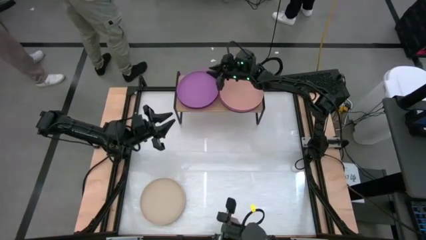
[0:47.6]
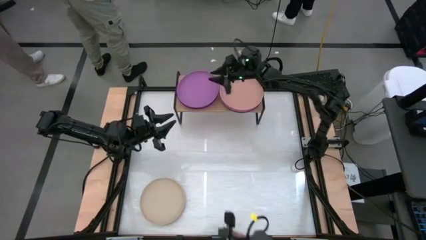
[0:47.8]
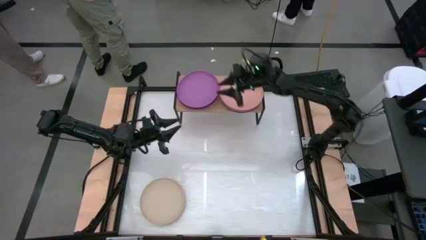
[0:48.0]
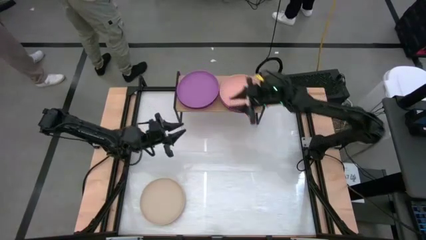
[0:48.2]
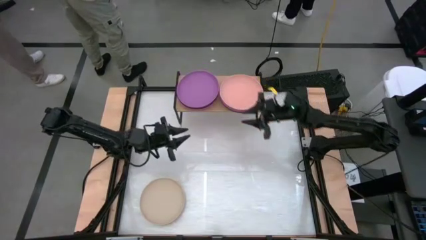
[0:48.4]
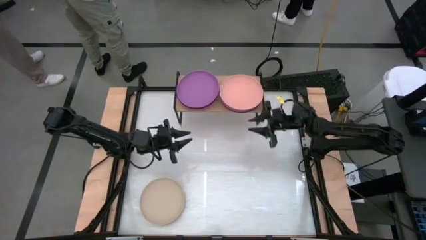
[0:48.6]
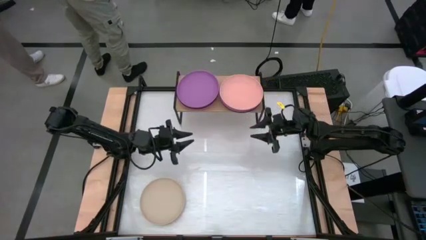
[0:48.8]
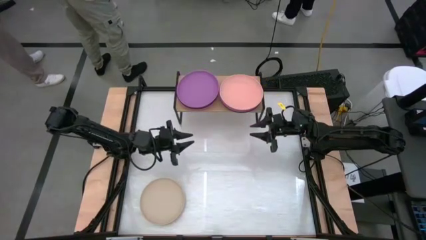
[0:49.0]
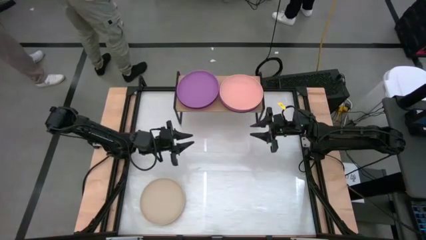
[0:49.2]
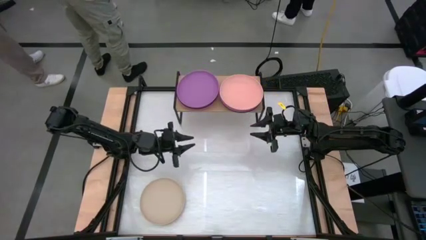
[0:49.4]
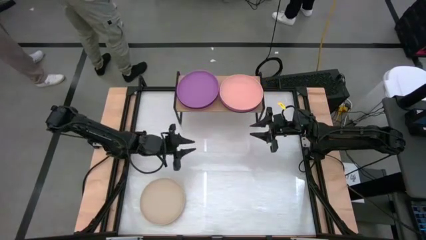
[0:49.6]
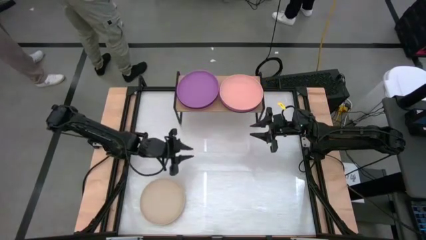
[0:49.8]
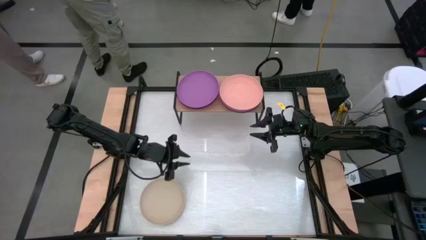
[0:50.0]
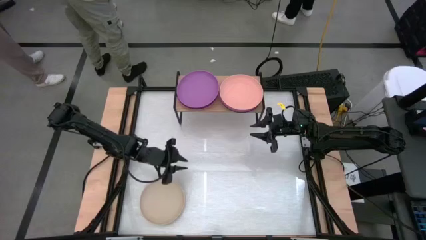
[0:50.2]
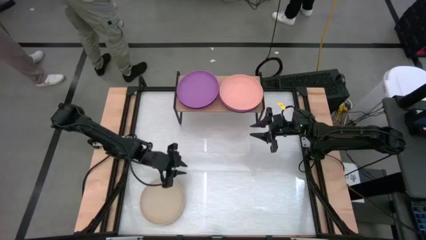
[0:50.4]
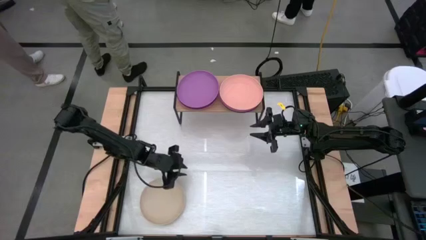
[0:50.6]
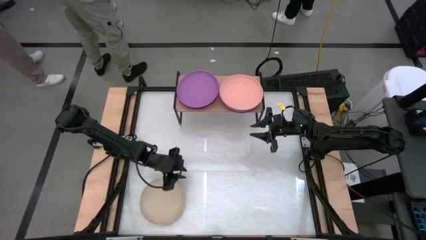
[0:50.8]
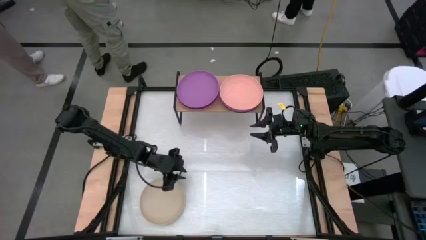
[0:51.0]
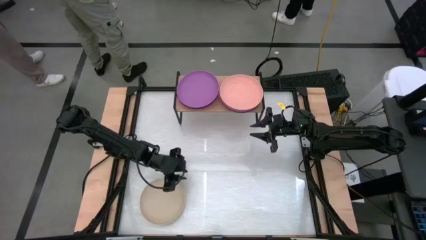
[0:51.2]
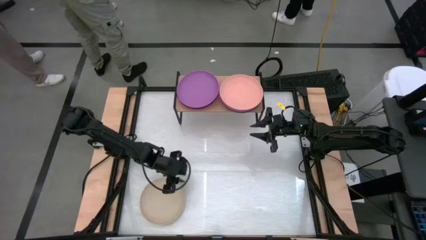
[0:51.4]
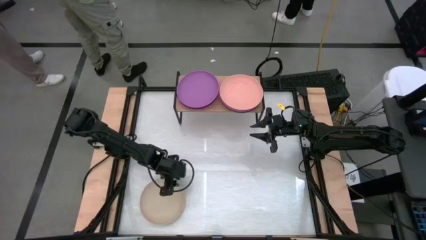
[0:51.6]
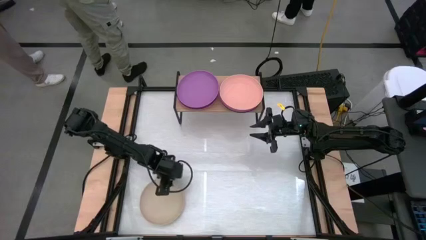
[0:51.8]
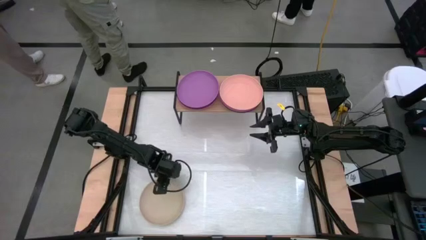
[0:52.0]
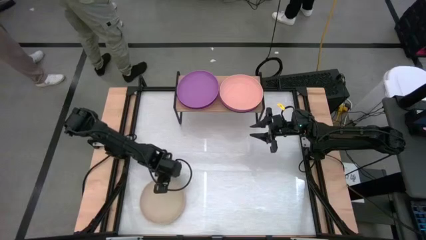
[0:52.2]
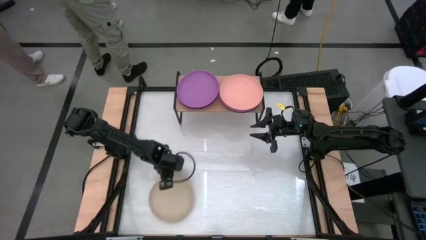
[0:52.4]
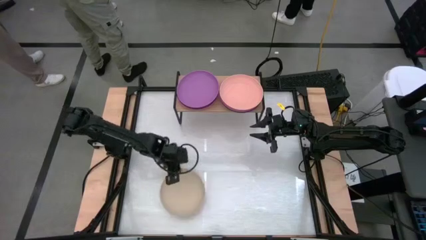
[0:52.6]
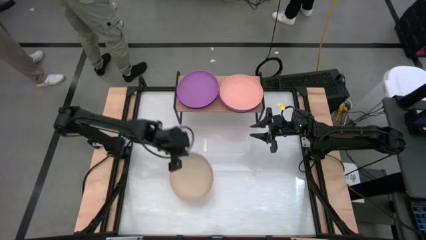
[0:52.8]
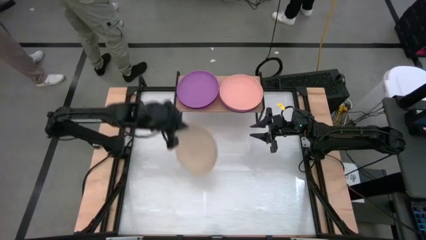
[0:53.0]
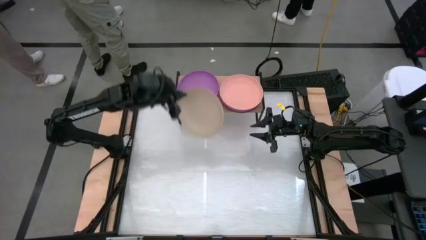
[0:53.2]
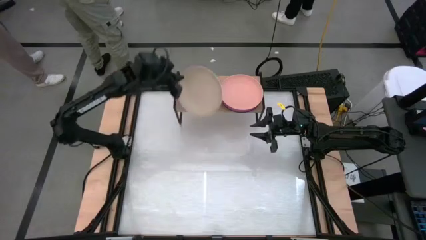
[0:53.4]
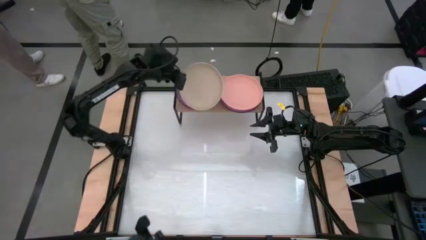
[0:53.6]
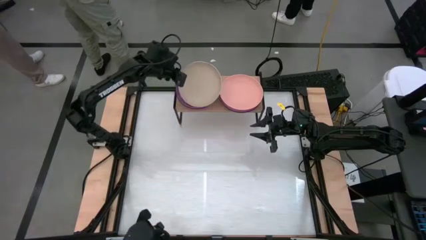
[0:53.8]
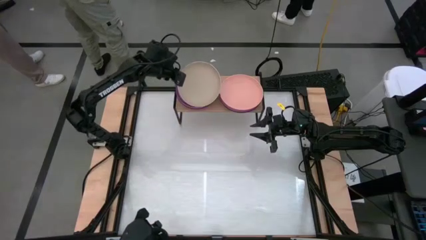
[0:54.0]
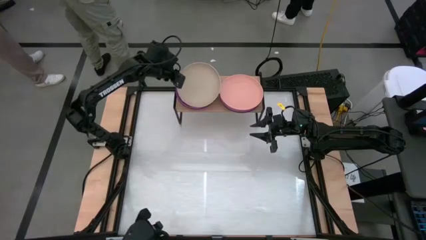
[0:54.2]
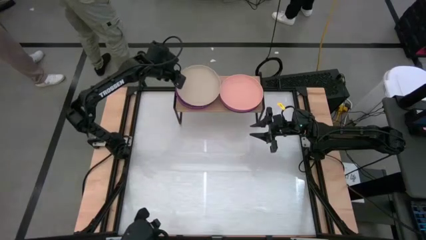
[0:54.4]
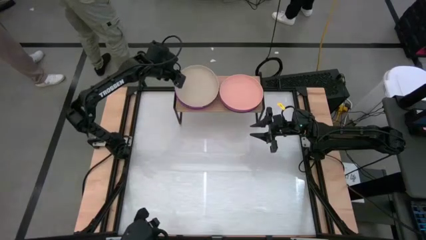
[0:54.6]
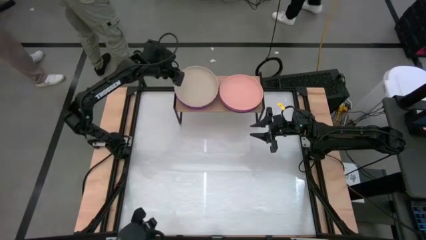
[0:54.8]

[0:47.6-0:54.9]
Task: Place and stack plates onto a shelf
Stack the gray plate on top of the purple plate on the shelf

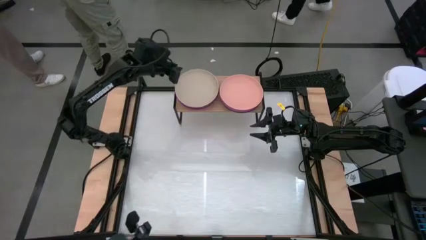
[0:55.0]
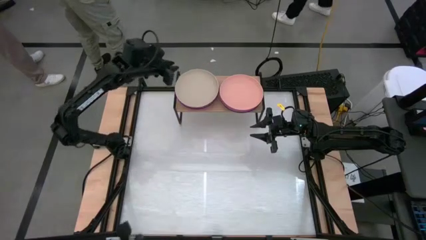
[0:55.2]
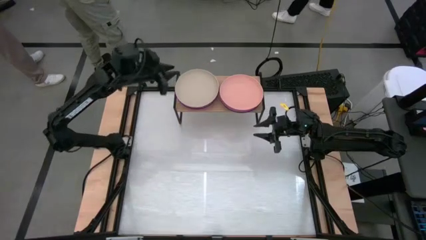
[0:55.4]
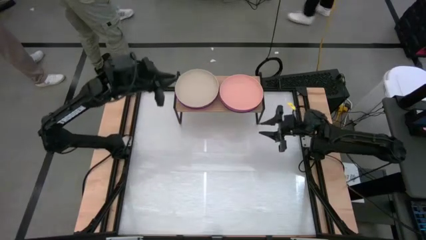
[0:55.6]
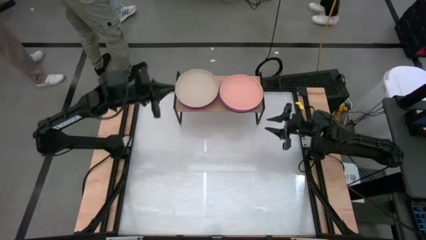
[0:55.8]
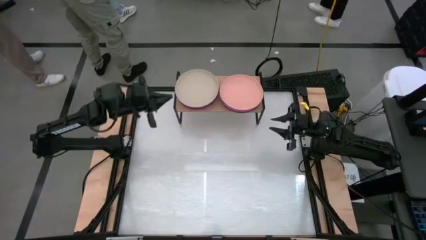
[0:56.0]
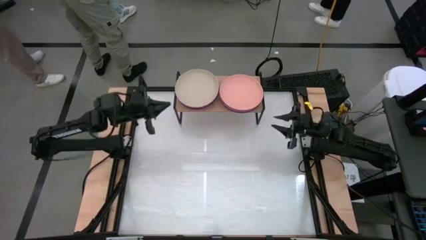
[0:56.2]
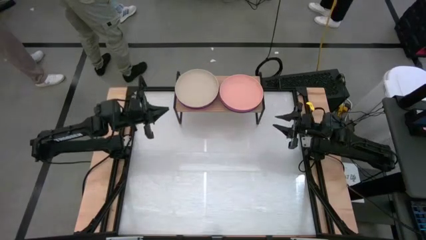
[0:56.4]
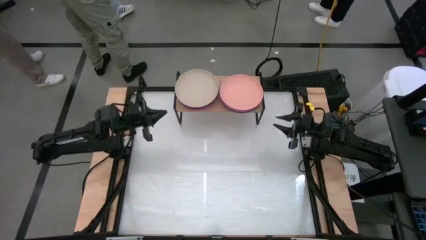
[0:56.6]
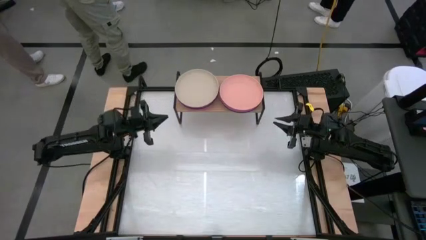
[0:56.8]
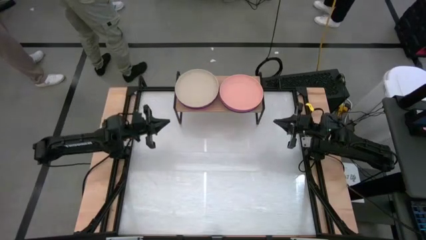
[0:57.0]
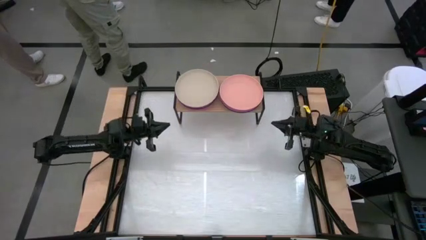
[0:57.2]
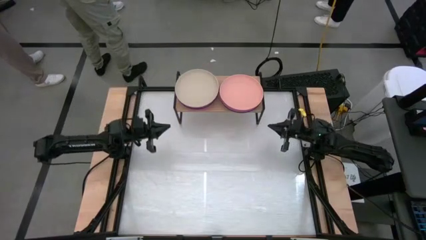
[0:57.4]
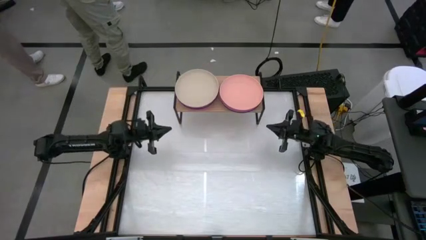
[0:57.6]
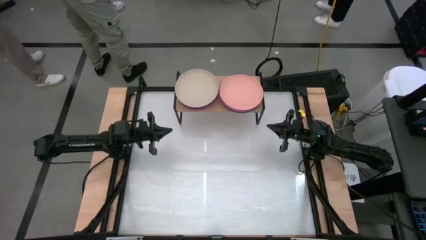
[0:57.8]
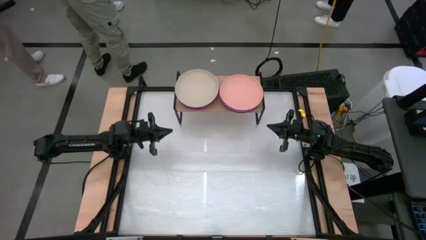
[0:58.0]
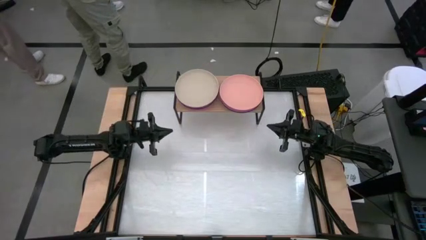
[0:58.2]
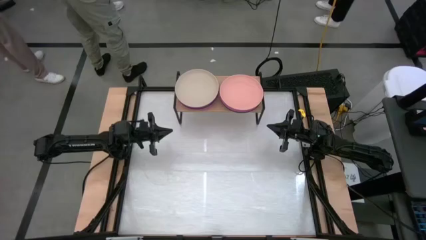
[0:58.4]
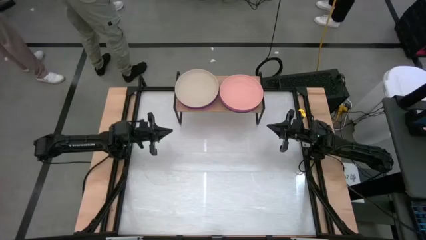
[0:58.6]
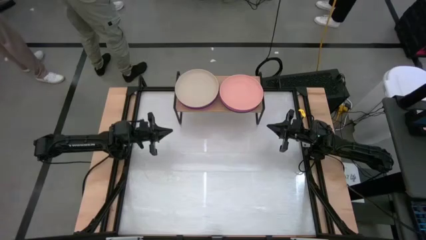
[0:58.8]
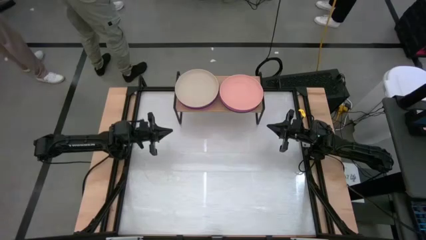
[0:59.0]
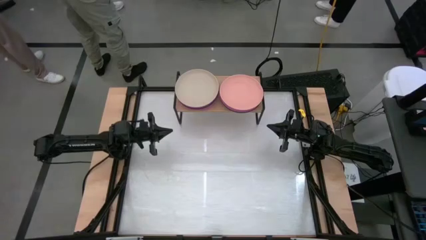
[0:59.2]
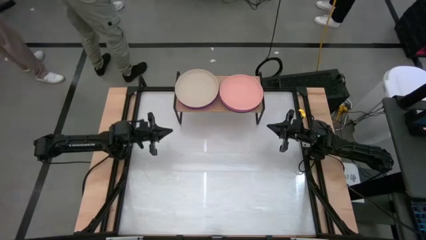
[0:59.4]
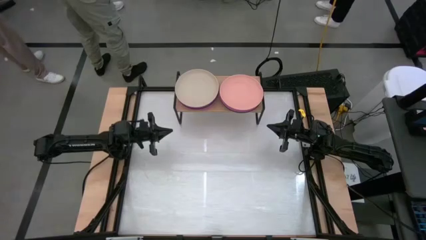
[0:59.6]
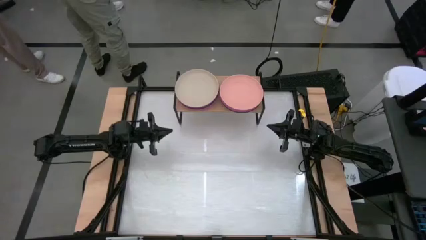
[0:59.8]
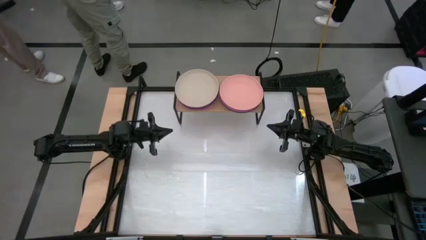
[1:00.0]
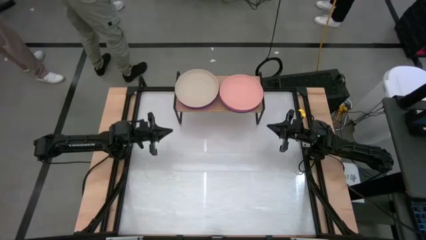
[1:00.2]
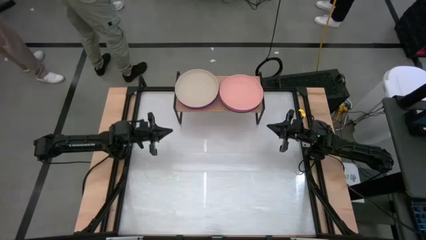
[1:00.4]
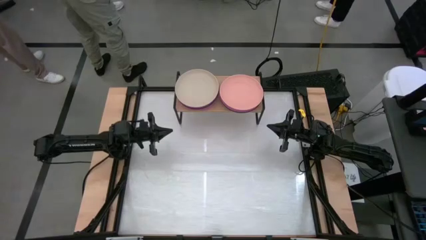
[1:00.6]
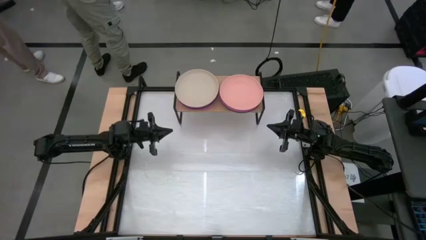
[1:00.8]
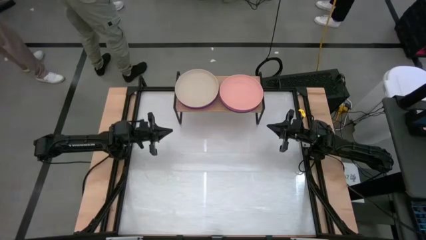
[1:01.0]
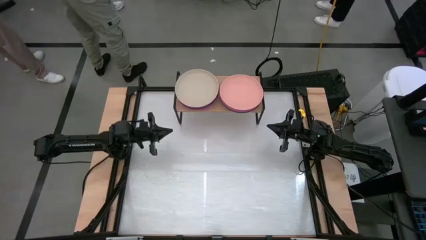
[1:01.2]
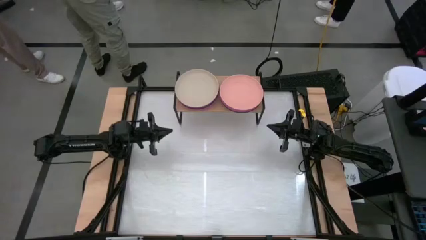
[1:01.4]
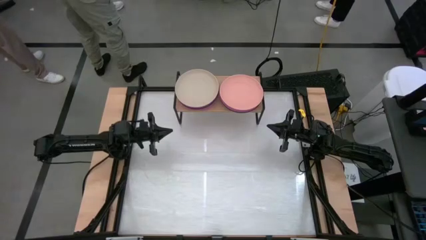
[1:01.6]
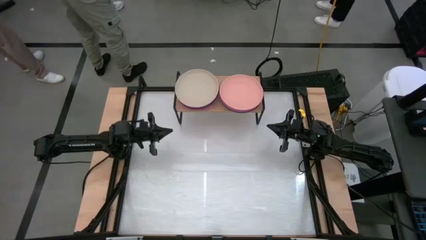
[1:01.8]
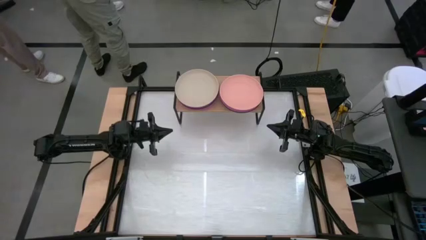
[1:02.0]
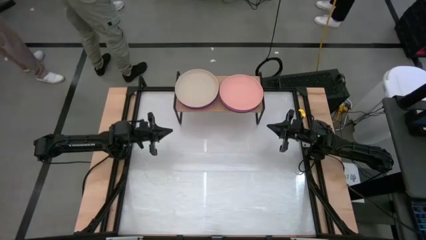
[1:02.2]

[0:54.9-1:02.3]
Return to Home Position

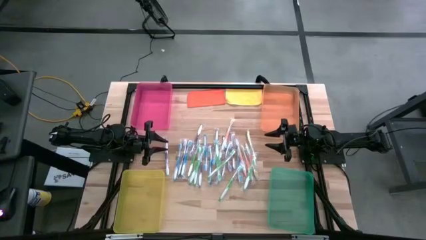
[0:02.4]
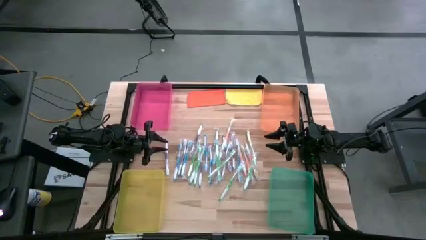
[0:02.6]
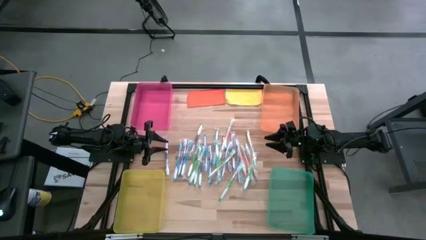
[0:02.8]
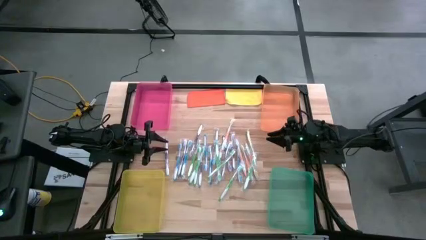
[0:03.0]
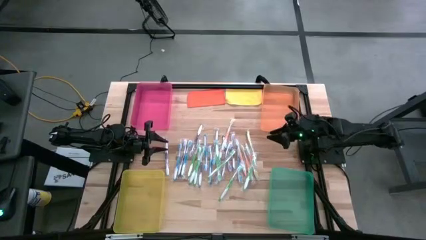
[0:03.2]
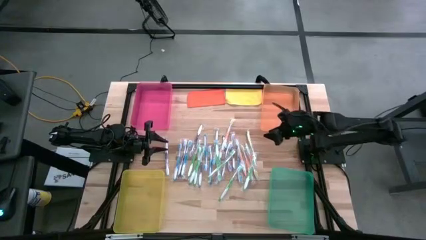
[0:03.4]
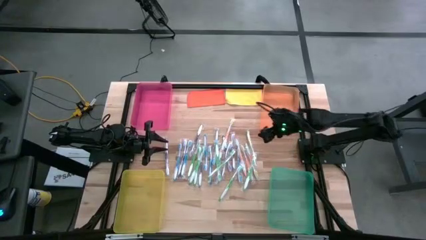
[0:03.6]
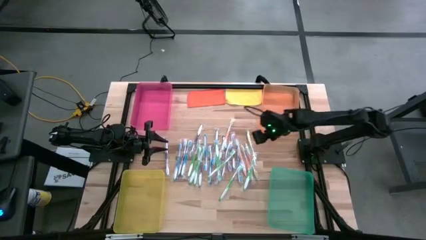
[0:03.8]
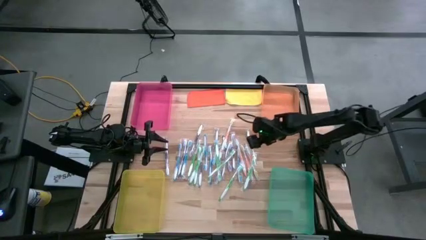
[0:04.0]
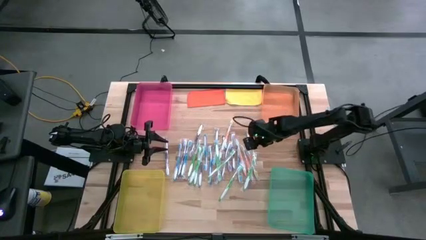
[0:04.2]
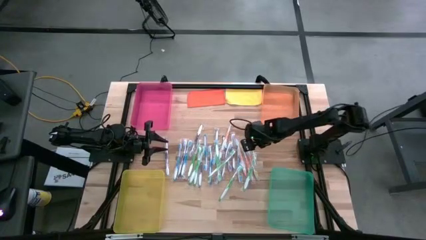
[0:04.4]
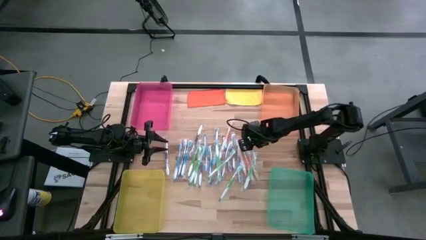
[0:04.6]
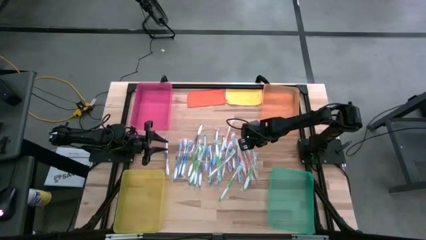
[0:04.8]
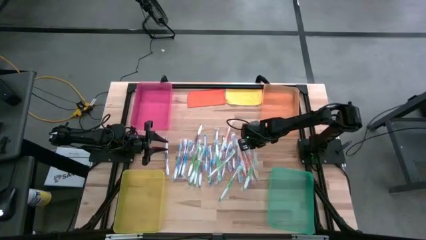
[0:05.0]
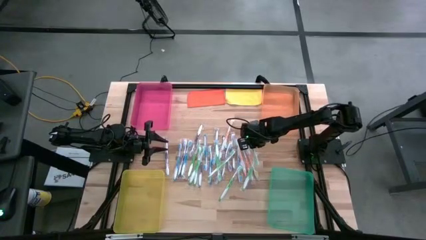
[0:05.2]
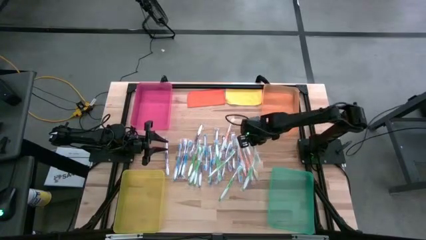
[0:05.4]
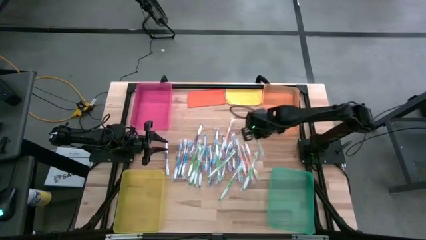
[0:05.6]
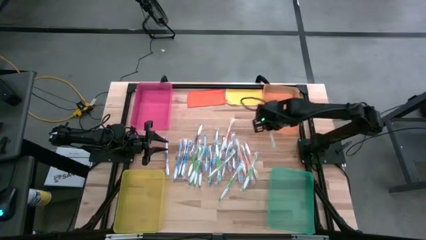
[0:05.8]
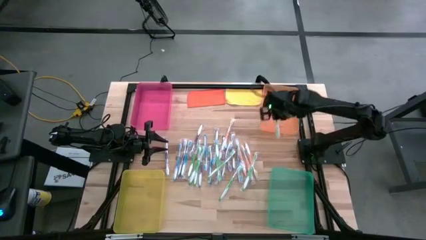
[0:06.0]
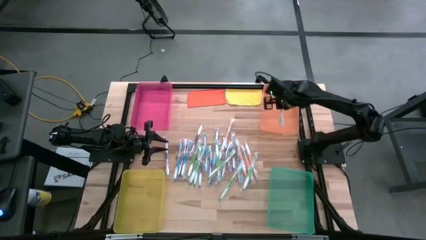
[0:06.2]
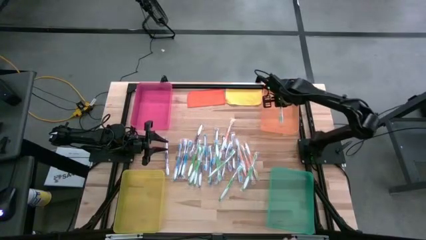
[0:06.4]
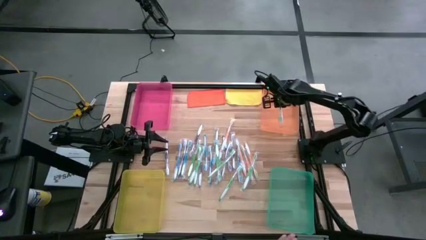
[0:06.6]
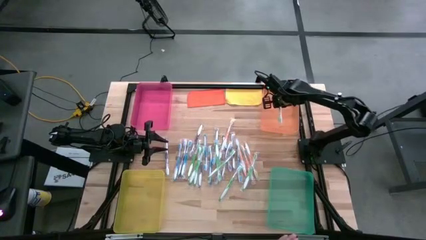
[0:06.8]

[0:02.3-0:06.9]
Task: Pick & Place Toothbrushes
Put the green toothbrush into the orange bin
